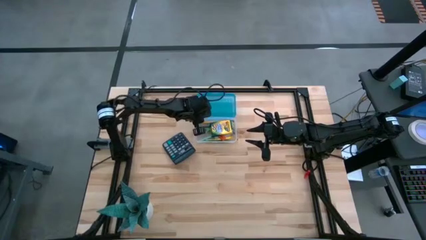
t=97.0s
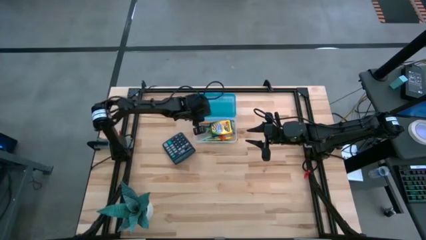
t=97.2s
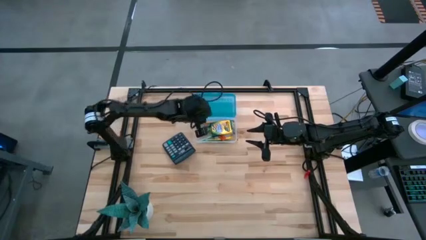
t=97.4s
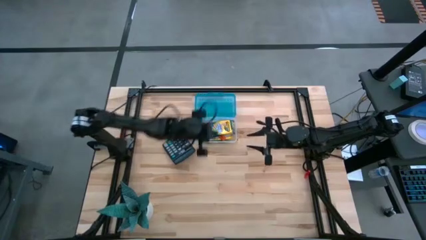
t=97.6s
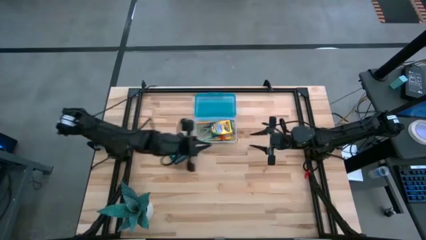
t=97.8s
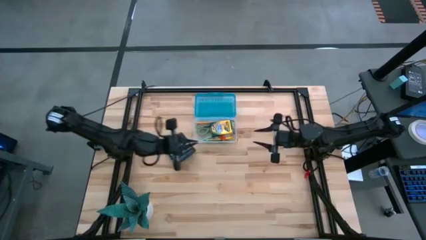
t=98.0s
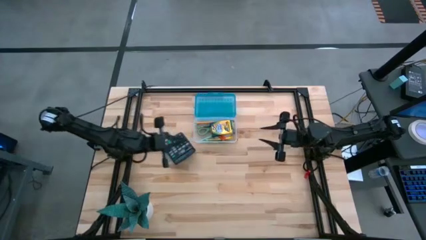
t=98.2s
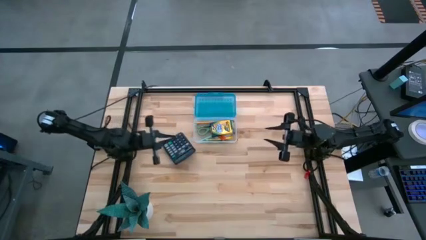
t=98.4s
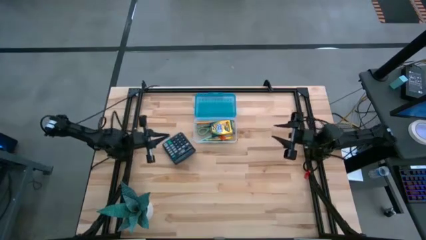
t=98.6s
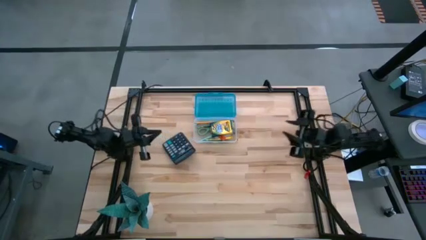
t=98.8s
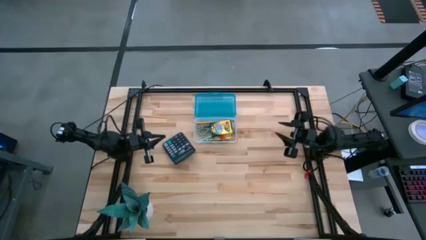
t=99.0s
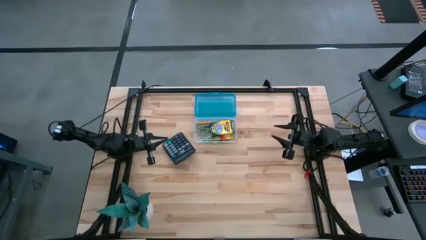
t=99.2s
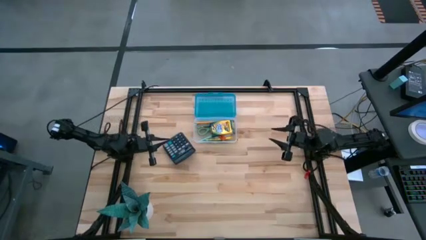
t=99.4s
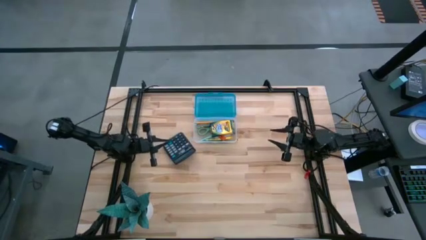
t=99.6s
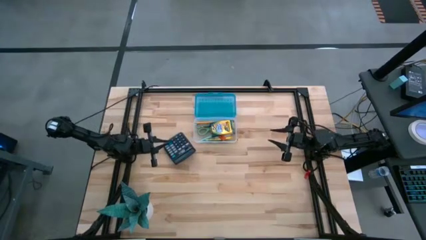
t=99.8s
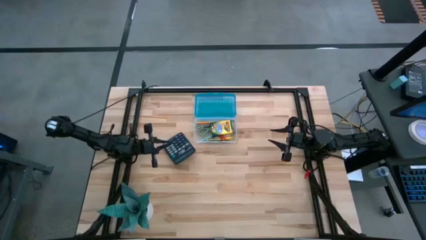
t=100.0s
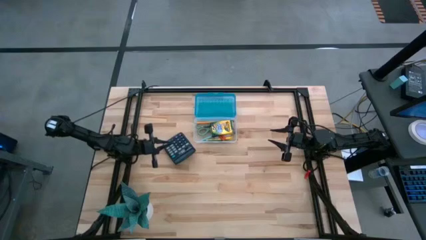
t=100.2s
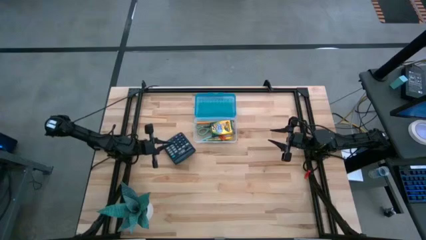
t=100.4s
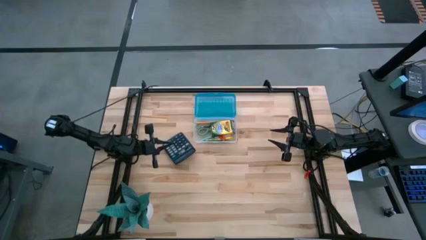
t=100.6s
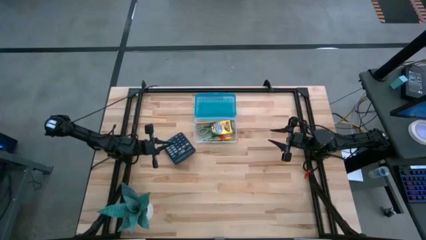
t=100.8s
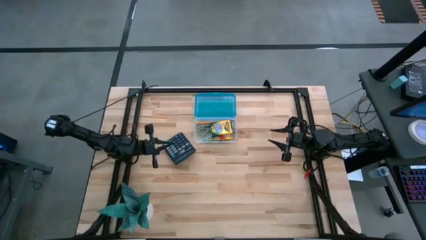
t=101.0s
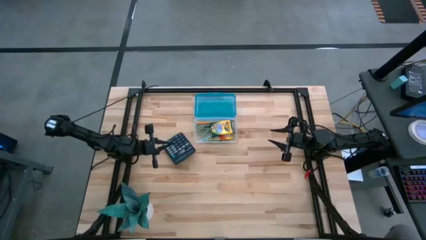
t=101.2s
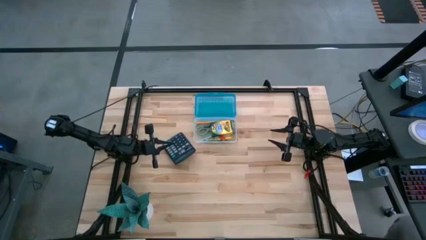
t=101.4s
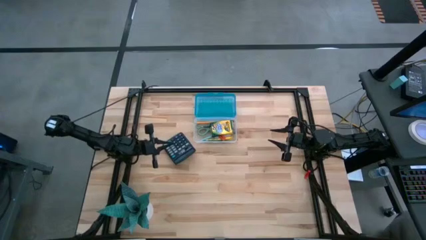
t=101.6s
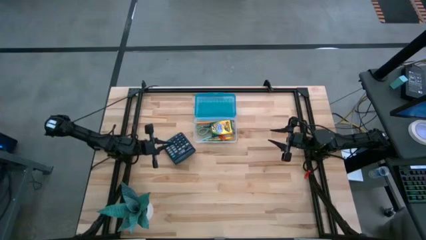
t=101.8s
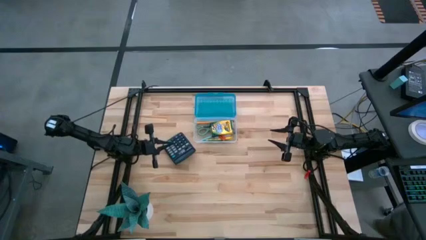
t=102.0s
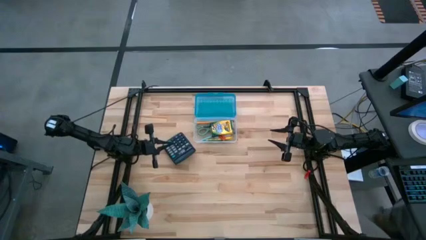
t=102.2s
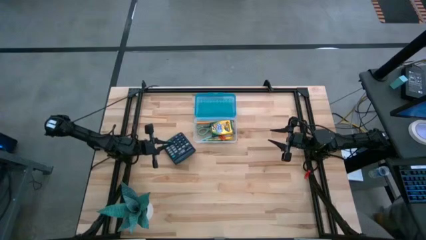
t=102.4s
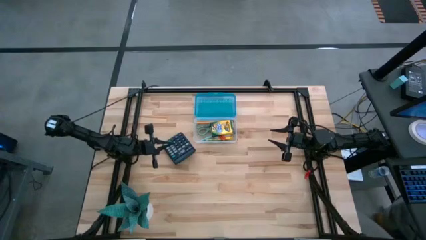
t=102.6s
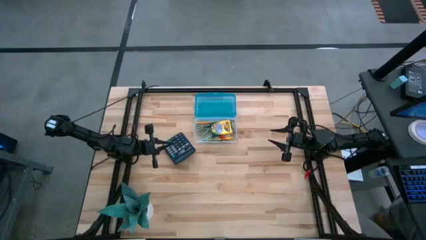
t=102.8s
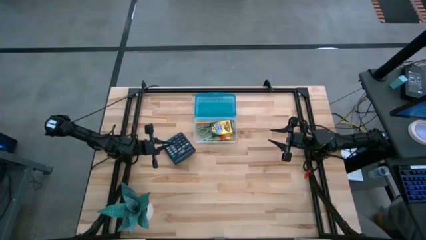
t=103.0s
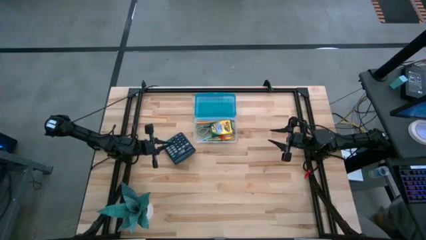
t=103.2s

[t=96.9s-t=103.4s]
Task: Pack school essentials
Return to Home Position

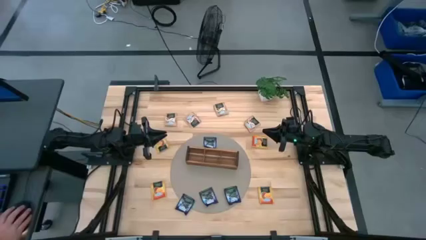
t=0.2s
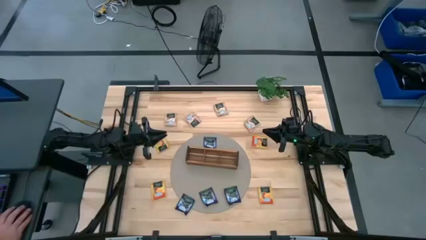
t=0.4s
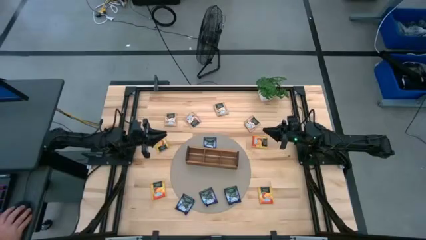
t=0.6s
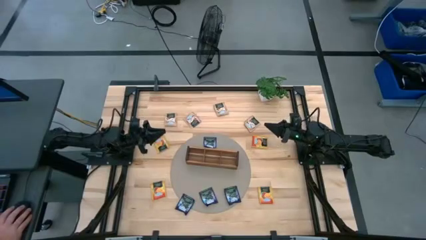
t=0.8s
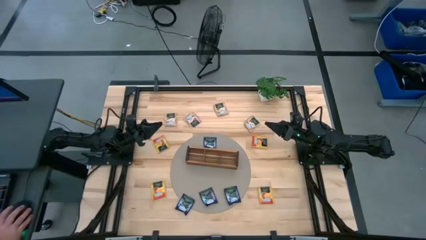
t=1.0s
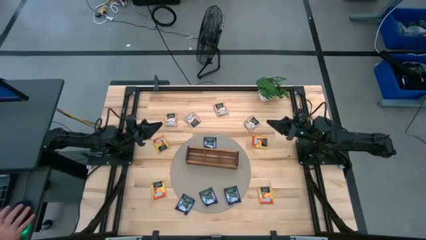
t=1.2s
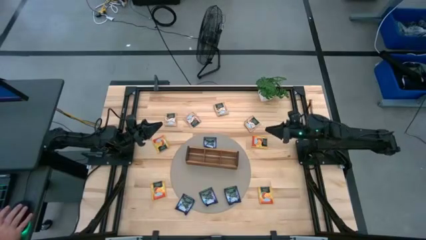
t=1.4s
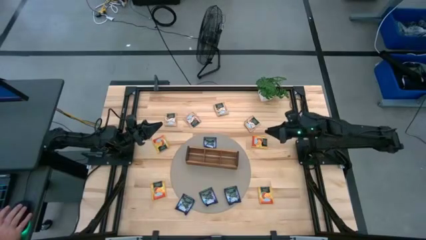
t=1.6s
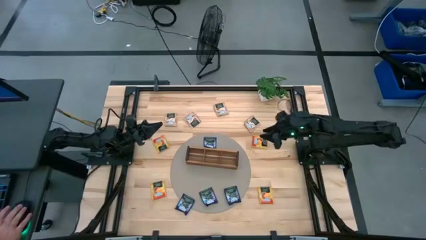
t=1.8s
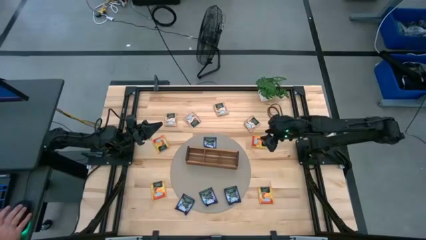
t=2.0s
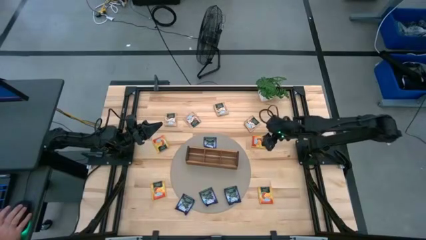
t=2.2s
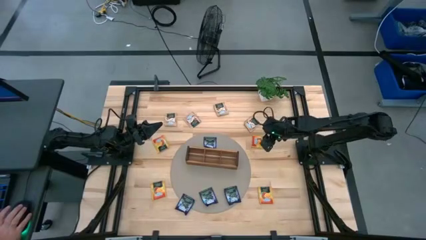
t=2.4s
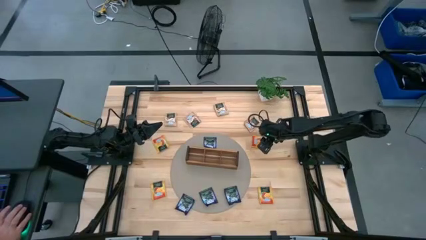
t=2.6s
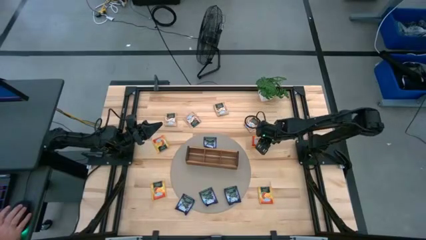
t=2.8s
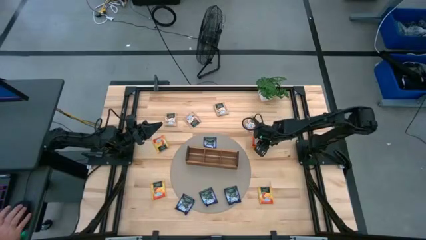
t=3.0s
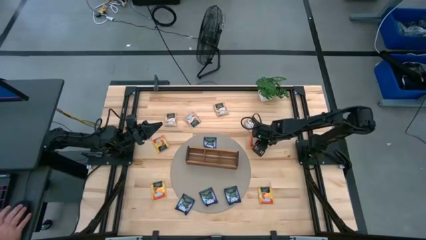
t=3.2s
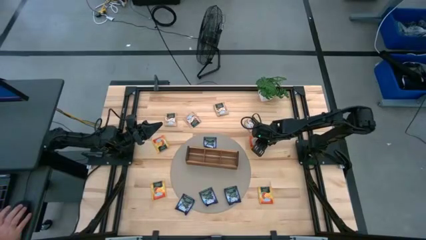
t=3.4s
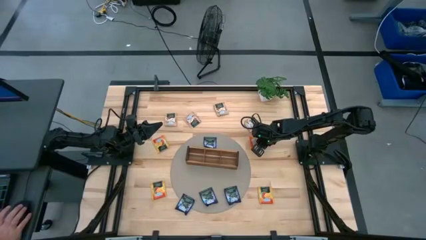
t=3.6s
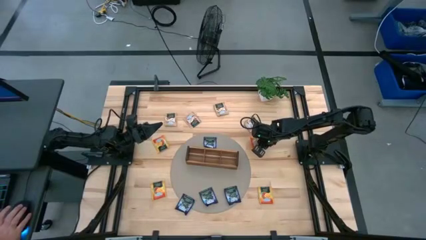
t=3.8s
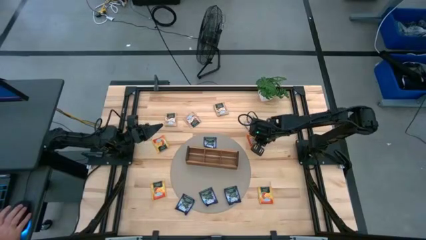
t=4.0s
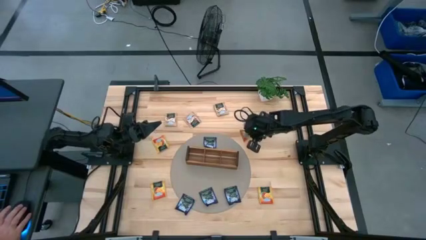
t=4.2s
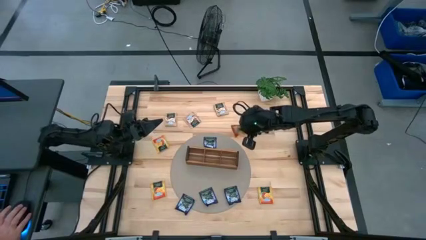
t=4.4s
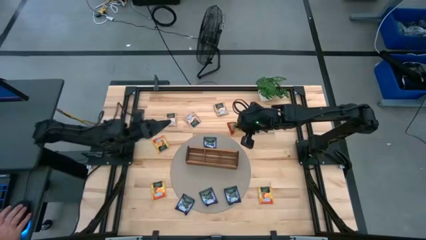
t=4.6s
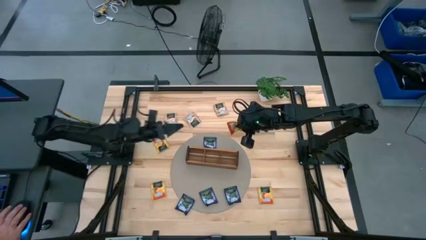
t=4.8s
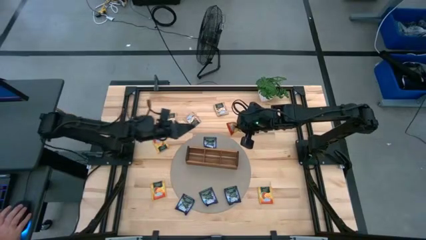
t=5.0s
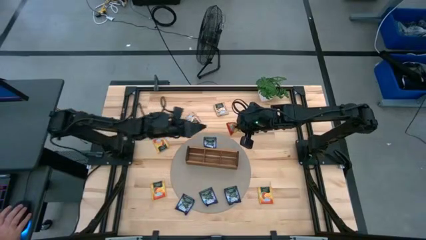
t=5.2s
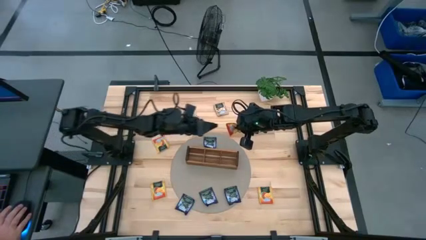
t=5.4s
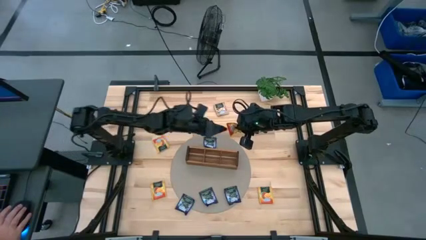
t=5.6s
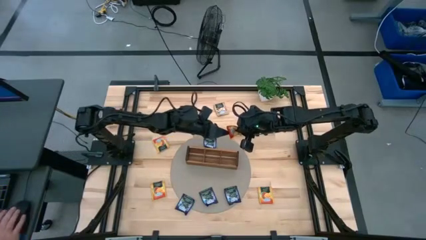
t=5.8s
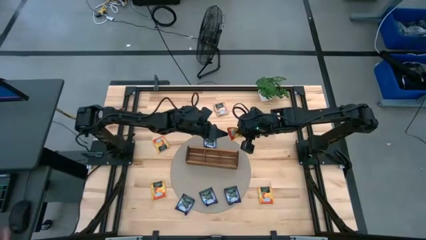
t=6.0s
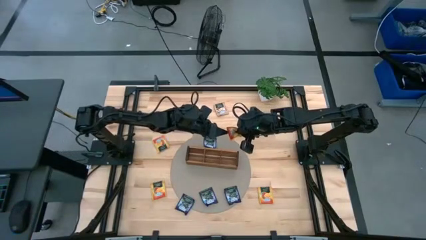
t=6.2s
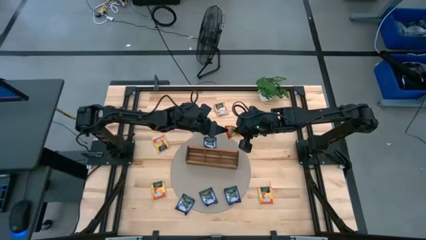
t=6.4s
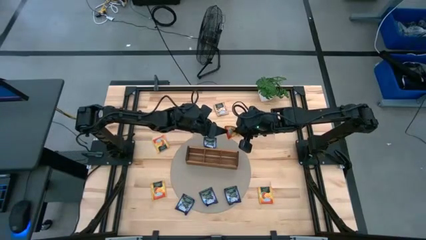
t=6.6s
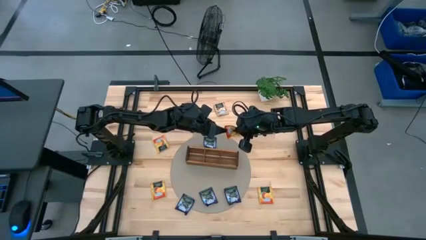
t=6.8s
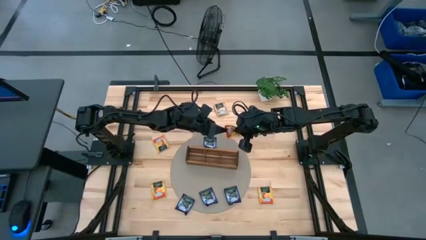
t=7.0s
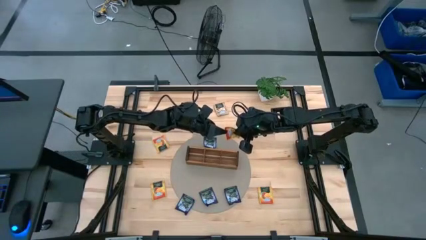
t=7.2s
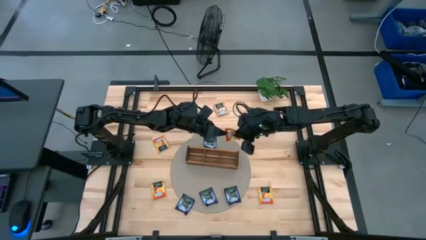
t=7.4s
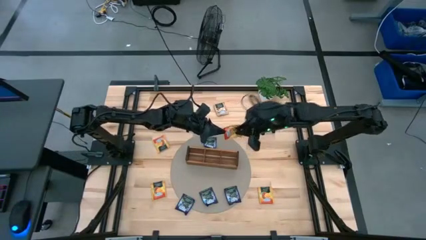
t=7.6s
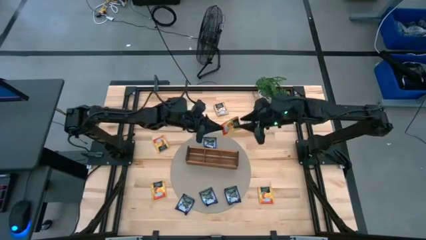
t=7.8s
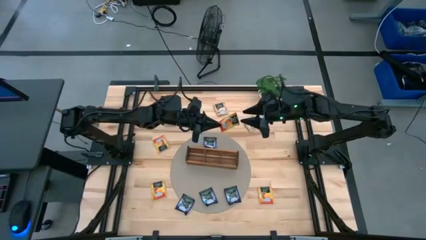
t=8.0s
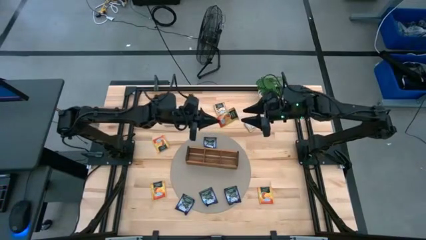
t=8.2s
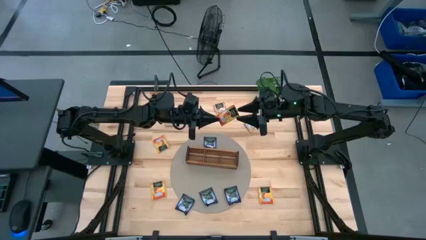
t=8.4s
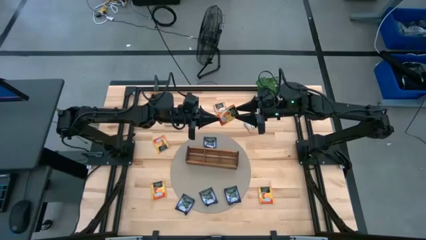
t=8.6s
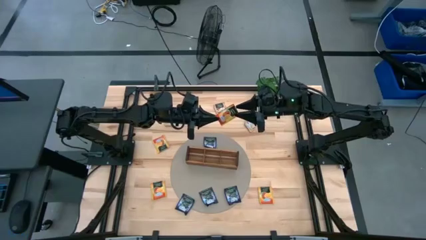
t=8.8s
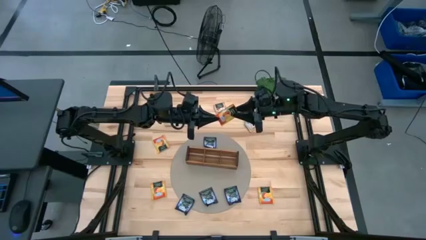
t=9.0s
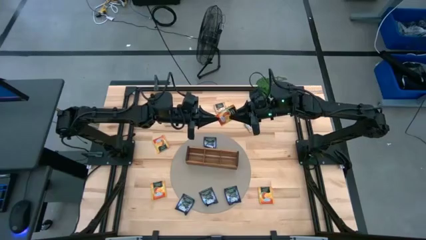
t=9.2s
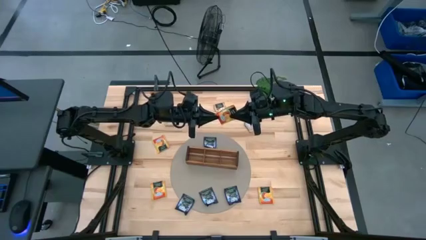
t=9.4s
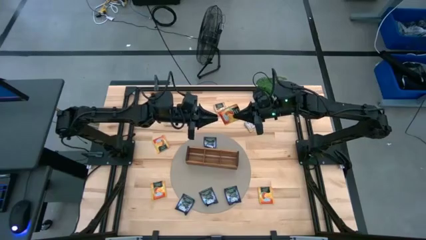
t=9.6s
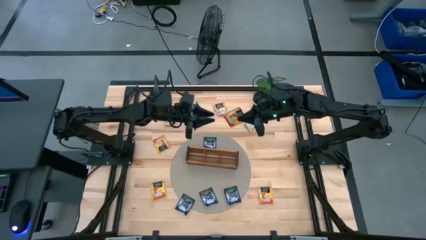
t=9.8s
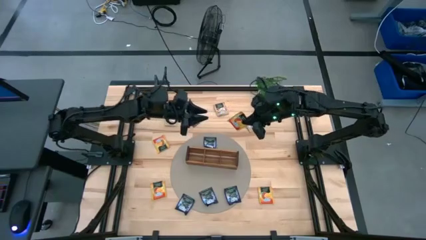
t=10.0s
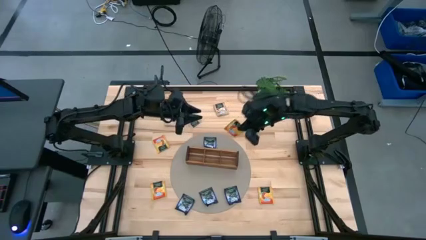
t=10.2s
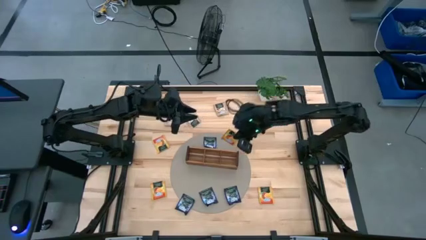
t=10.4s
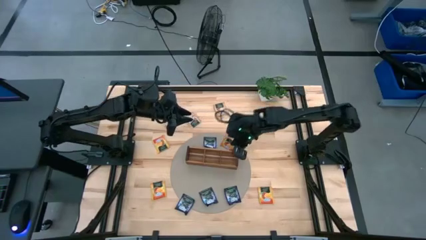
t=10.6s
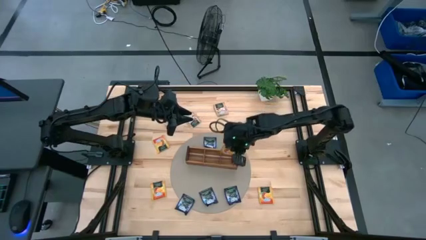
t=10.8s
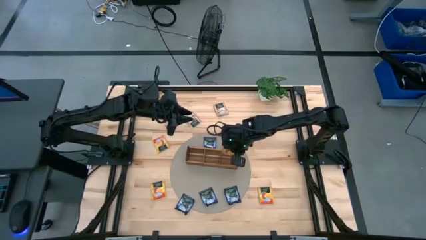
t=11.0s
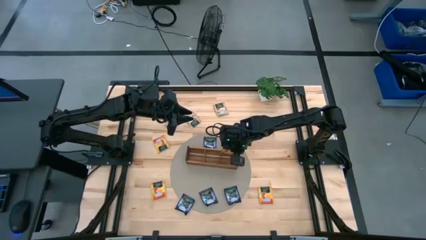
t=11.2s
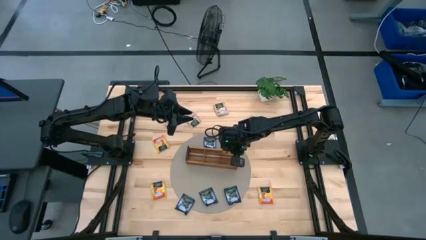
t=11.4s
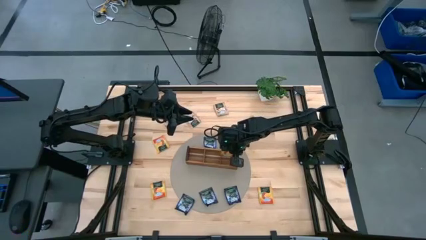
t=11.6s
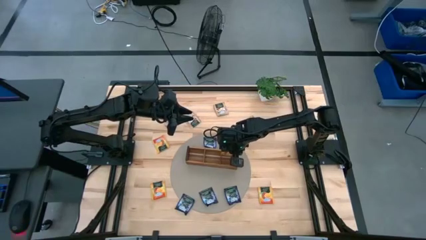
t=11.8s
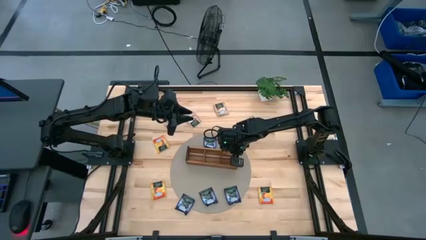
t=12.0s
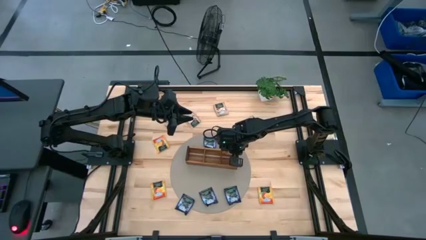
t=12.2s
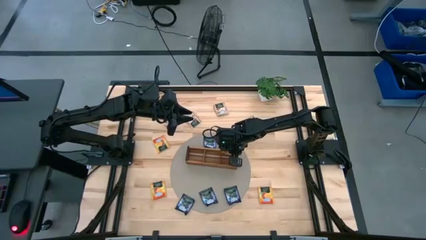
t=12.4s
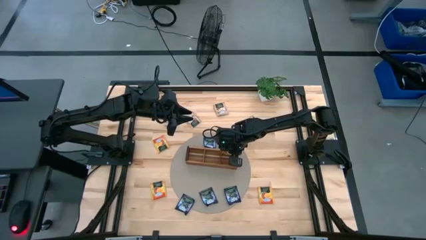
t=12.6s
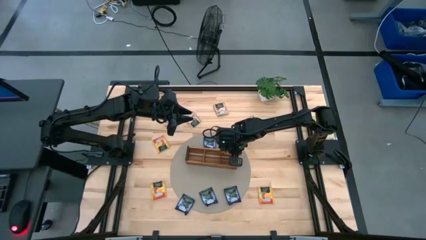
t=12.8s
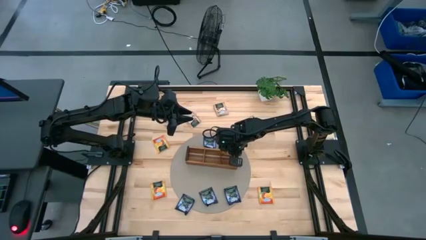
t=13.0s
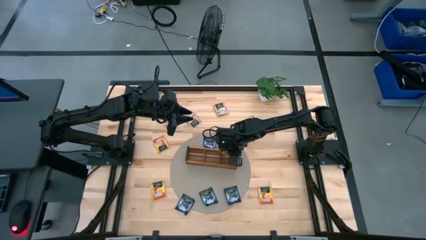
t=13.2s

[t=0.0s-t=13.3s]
Task: Pick & Place Tea
Put the yellow tea bag into the right section of the wooden organizer
